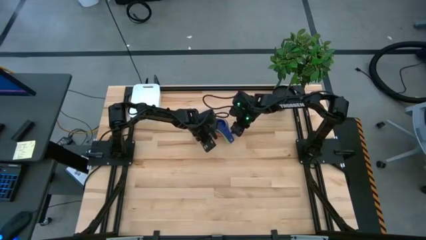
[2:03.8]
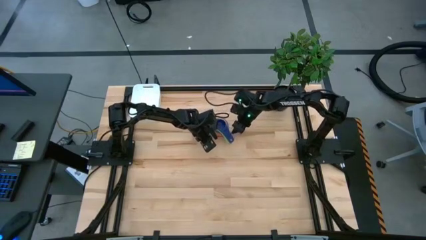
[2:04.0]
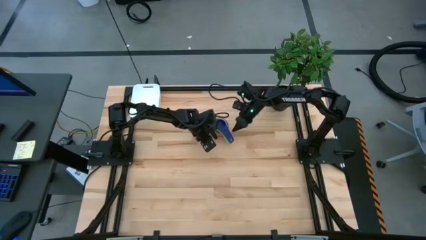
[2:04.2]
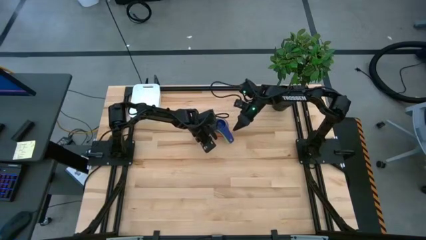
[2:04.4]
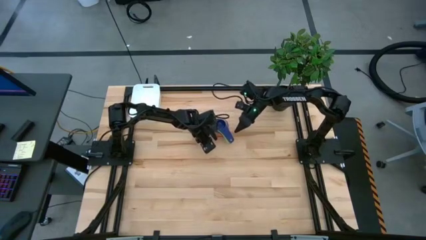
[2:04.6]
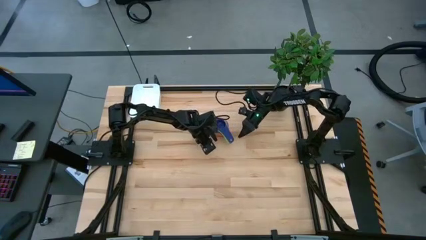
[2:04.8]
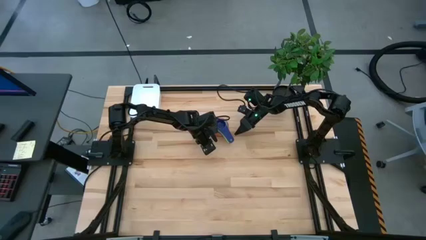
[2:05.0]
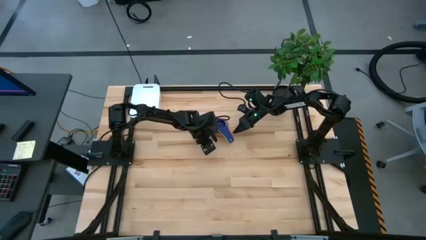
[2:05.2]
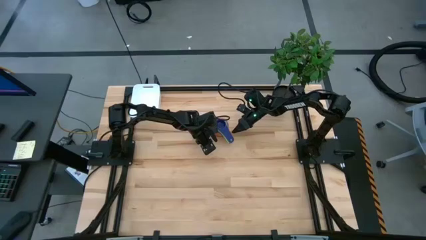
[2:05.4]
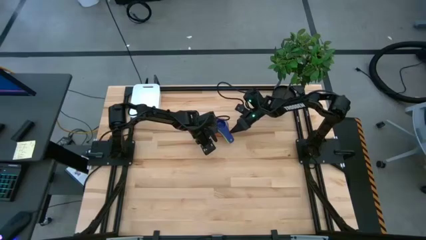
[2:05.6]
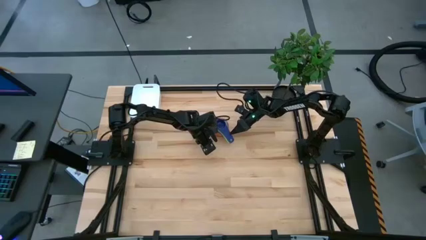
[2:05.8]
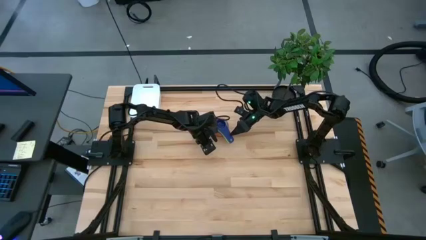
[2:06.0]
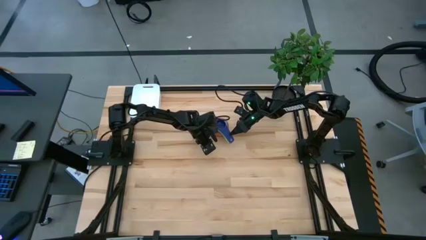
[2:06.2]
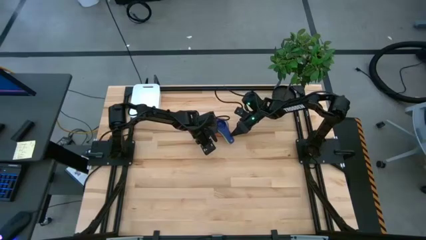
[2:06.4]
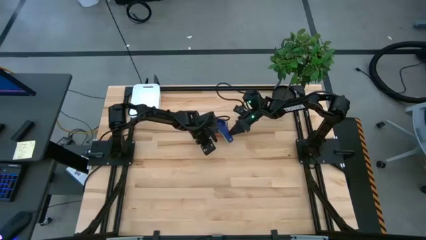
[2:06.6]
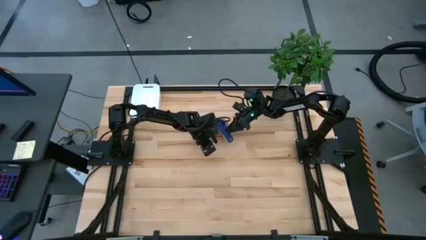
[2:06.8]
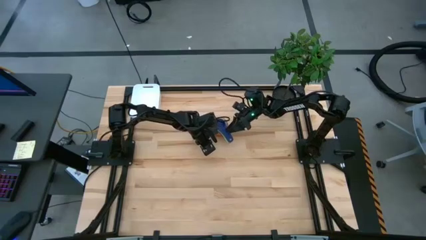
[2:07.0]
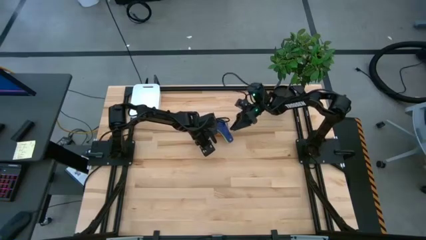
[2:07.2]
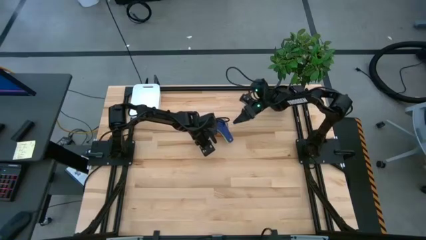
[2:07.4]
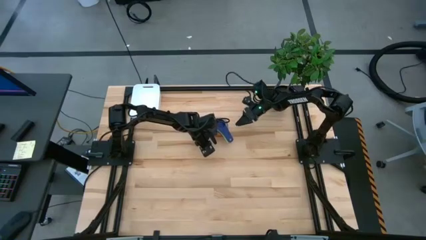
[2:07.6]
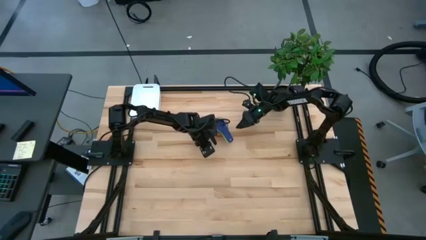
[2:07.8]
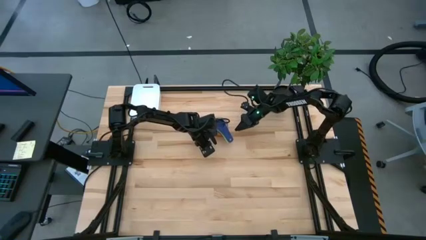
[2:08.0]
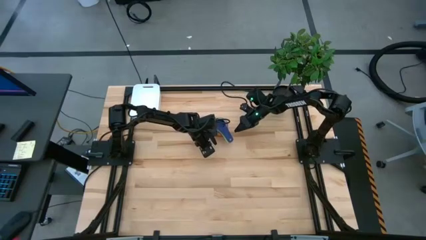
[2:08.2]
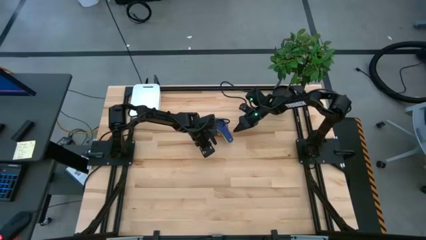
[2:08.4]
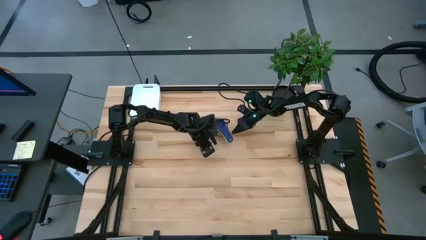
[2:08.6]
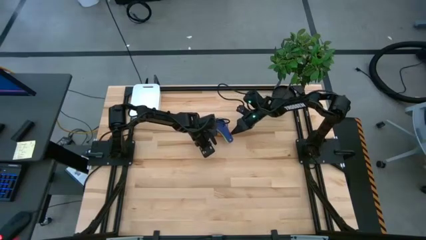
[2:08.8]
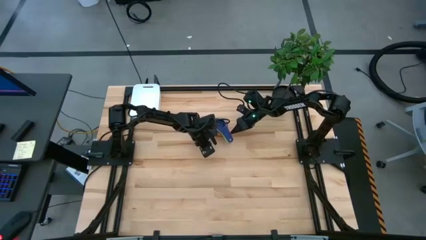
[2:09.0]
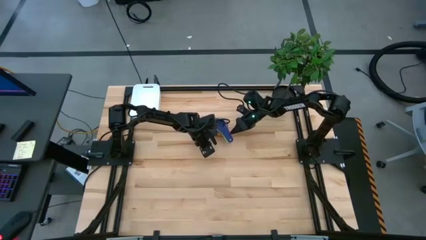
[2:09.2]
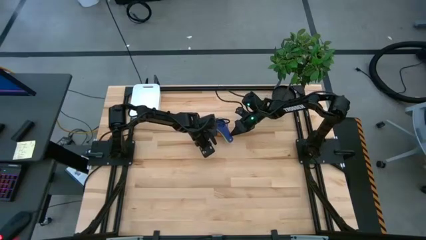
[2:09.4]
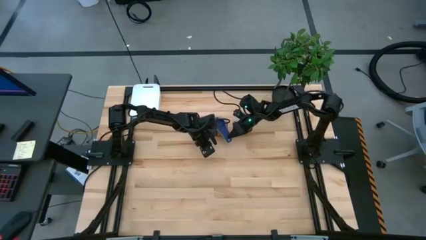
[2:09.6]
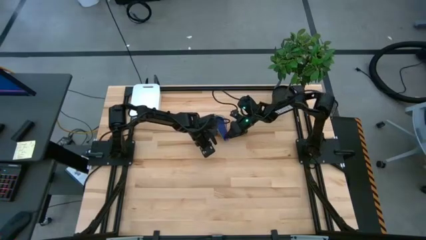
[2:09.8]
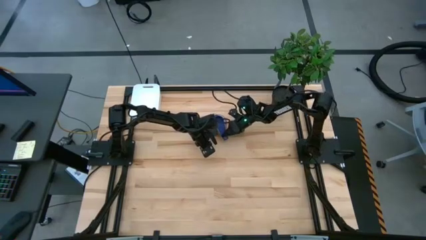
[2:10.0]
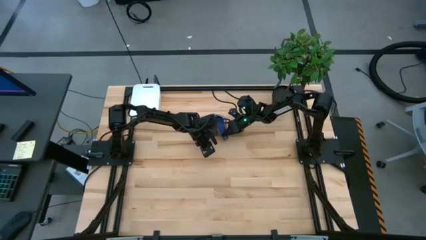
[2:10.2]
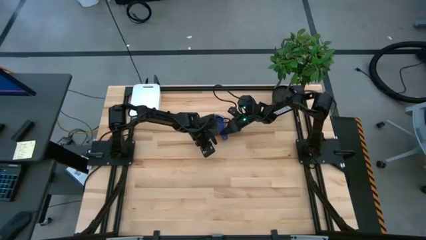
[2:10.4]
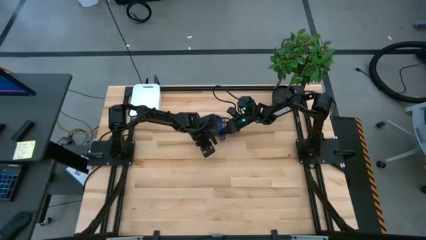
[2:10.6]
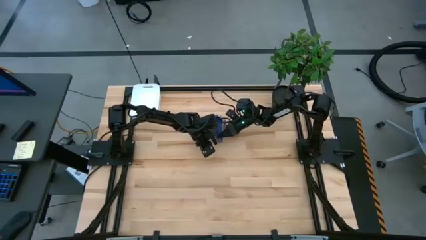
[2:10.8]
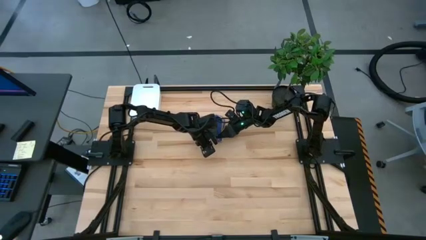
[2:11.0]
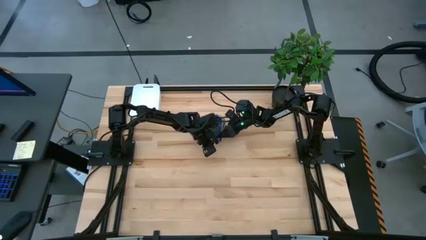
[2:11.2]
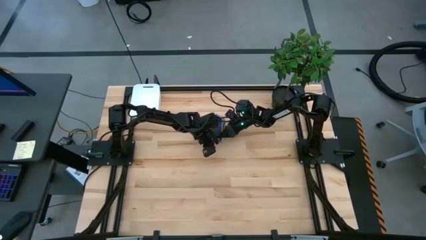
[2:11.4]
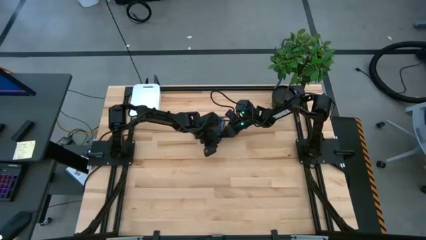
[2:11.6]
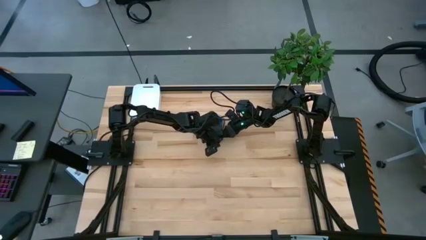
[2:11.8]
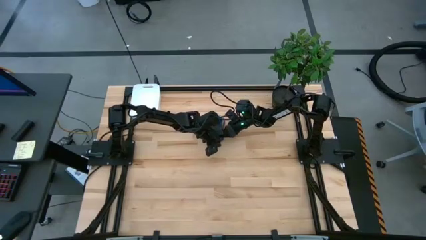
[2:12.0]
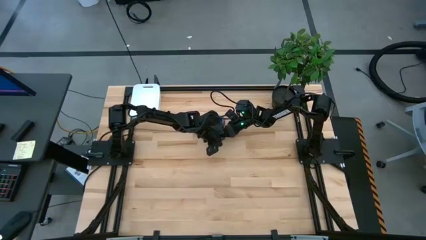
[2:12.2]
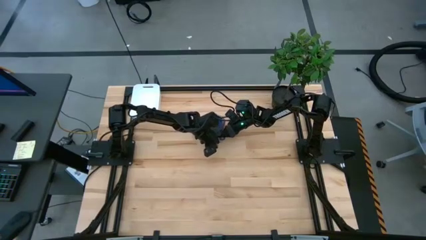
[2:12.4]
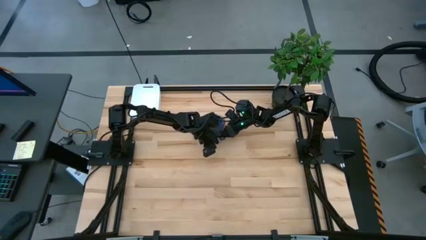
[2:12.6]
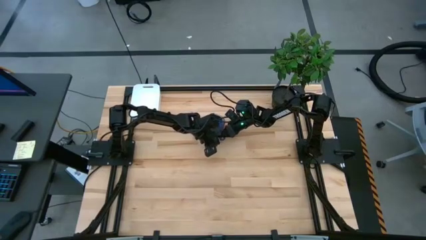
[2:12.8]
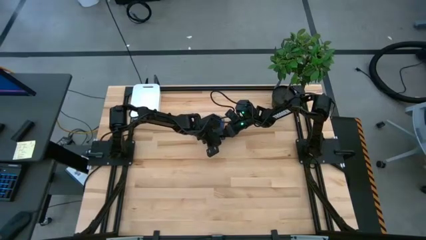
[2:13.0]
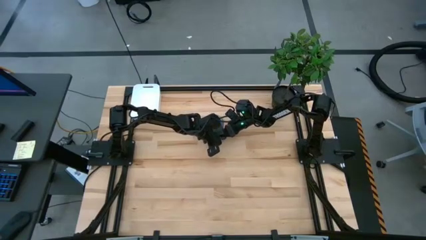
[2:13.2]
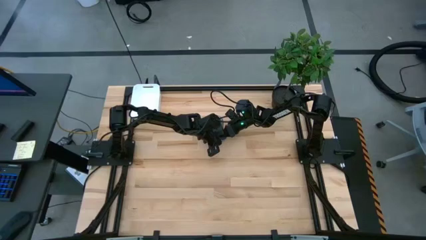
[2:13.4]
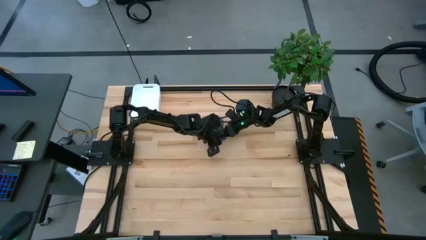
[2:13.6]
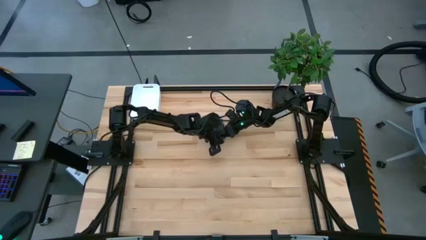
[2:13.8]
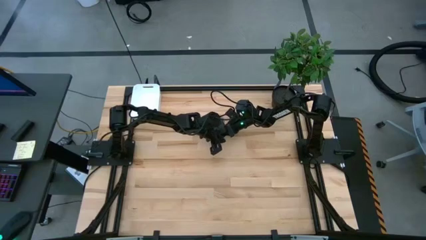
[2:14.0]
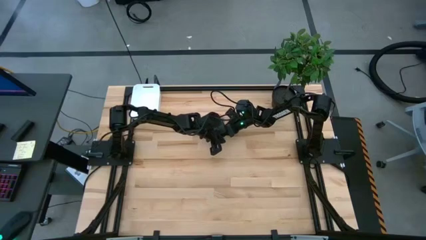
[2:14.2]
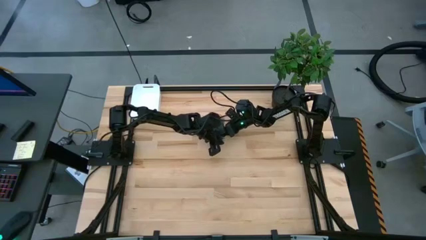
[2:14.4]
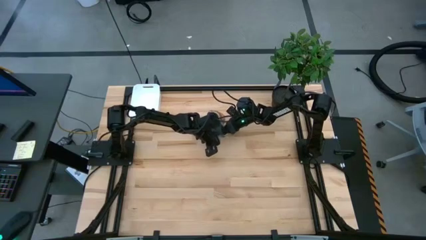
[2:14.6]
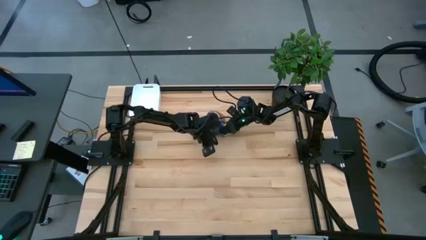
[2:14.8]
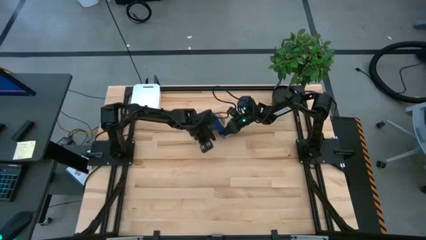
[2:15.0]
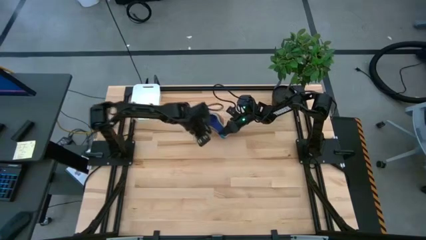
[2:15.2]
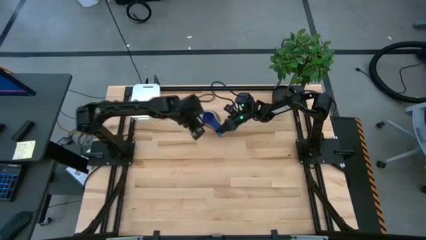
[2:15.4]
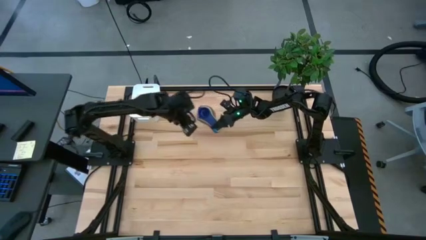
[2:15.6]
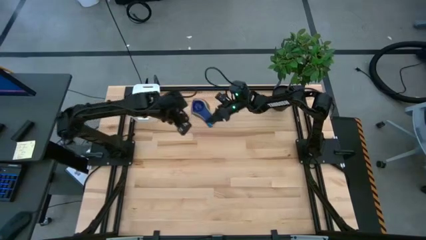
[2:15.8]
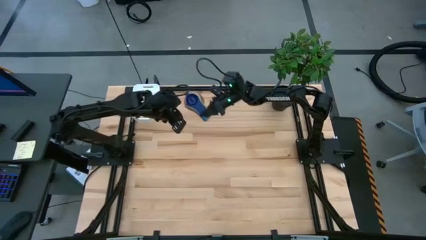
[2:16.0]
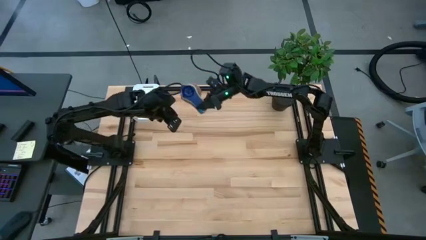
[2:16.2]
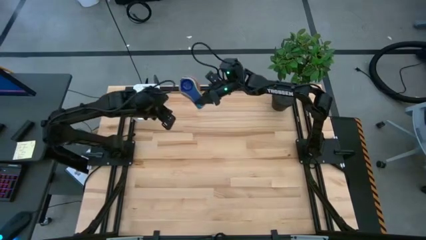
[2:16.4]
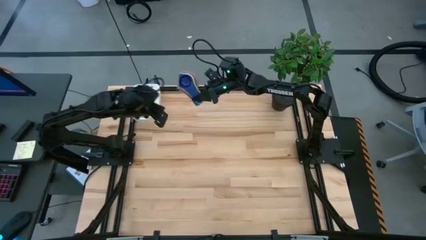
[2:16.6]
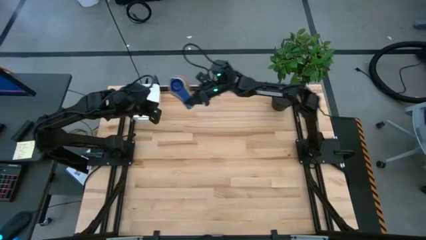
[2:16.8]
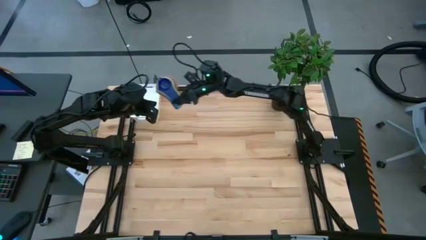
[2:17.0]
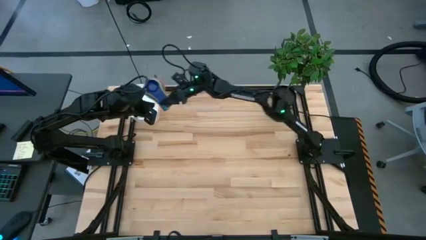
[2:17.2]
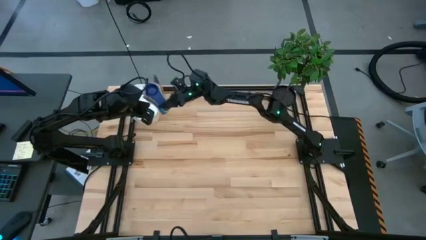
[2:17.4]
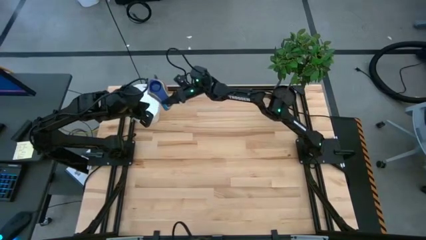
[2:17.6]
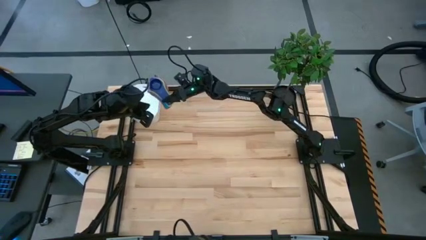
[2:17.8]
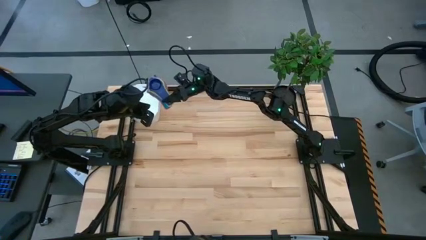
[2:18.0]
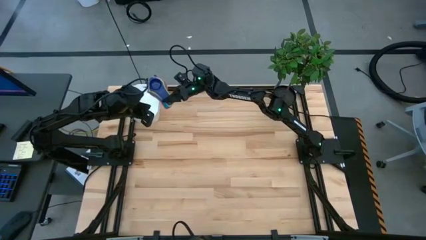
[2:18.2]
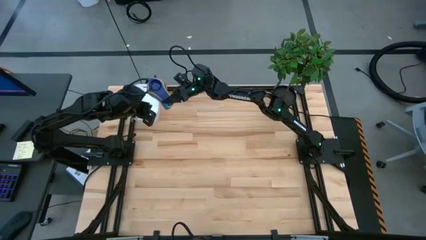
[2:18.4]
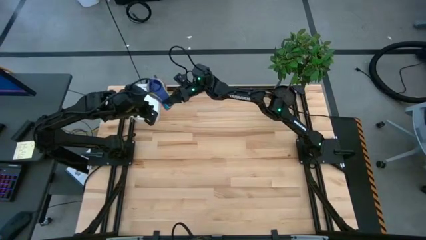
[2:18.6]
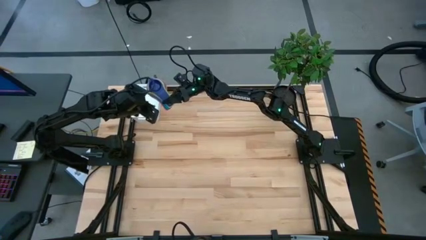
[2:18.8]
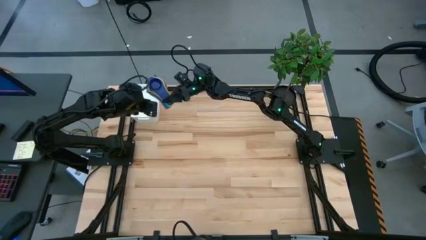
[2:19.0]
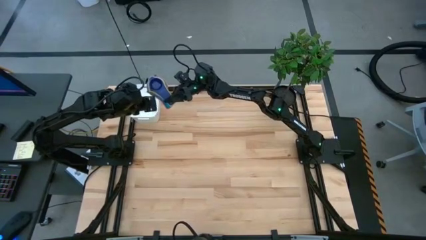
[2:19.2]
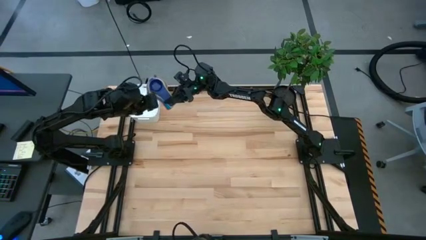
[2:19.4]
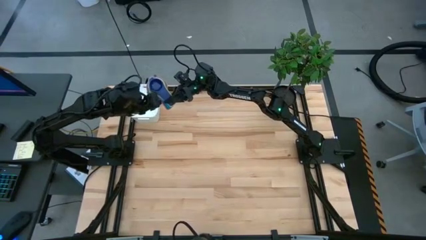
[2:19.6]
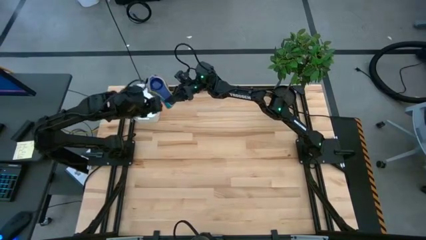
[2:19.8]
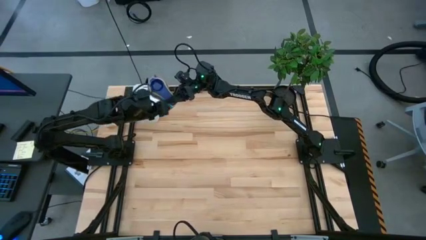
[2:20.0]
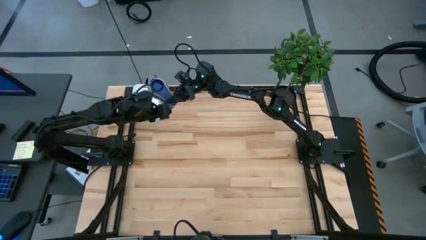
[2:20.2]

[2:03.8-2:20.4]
Task: Nest measuring cups in basket
Put the stacked of measuring cups into the white bin
